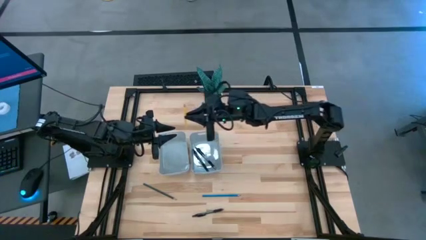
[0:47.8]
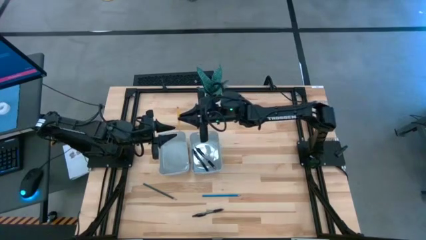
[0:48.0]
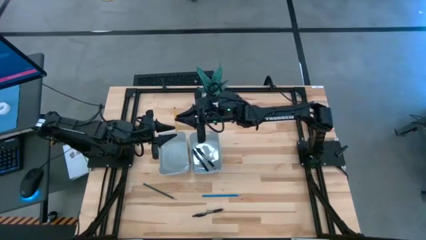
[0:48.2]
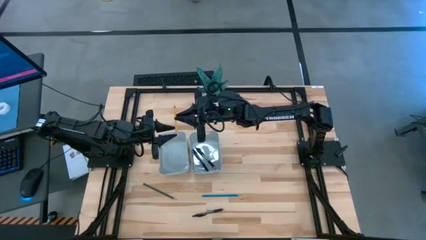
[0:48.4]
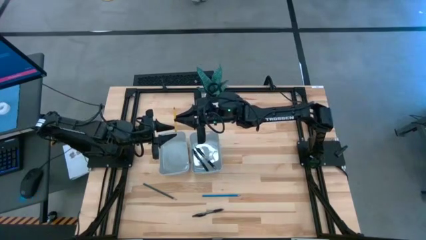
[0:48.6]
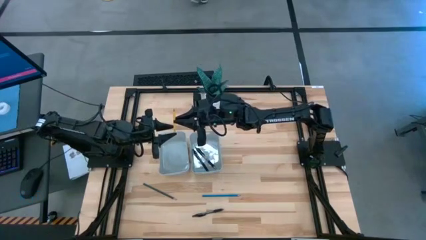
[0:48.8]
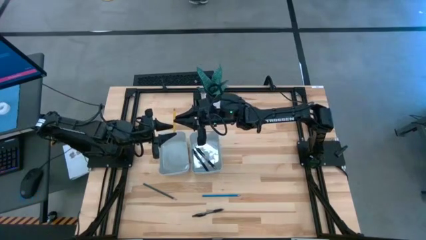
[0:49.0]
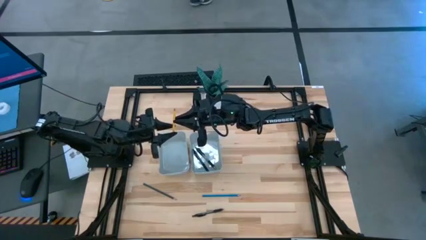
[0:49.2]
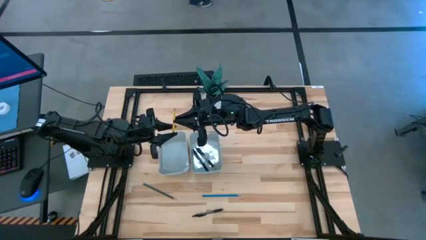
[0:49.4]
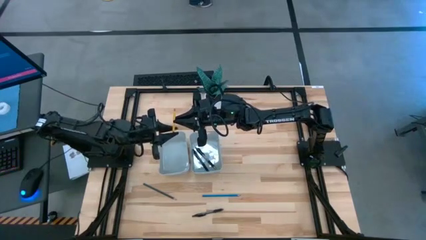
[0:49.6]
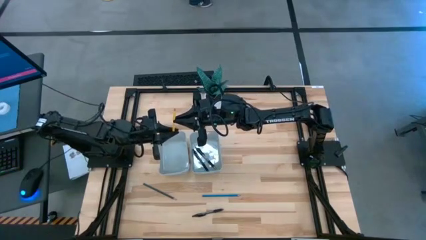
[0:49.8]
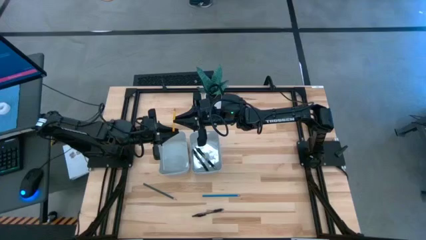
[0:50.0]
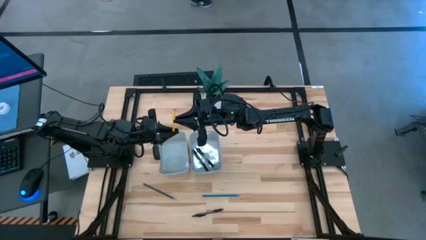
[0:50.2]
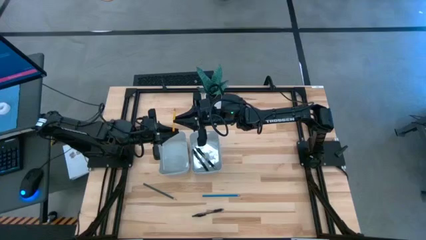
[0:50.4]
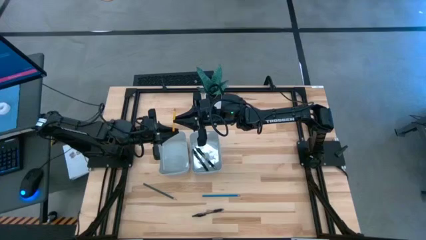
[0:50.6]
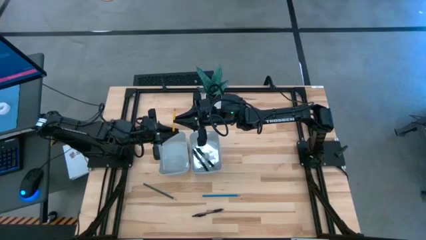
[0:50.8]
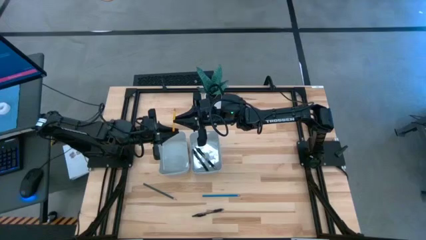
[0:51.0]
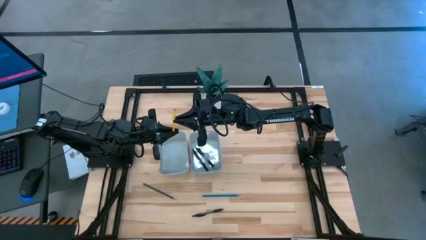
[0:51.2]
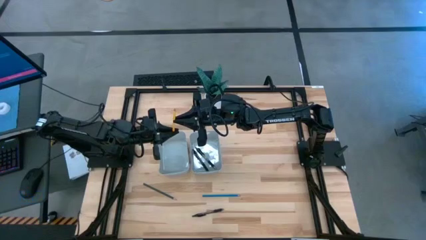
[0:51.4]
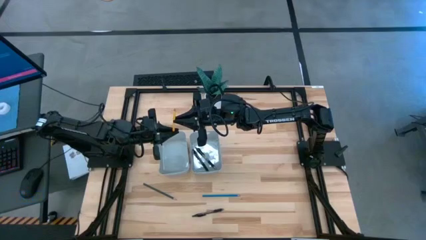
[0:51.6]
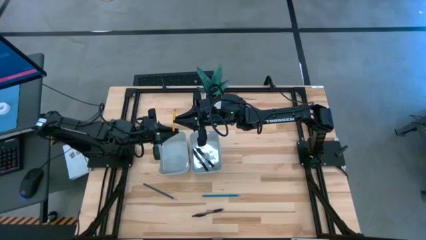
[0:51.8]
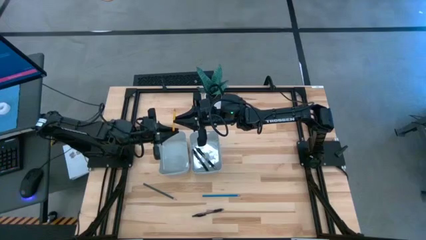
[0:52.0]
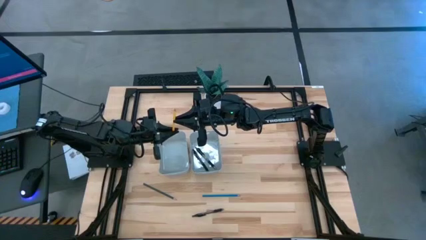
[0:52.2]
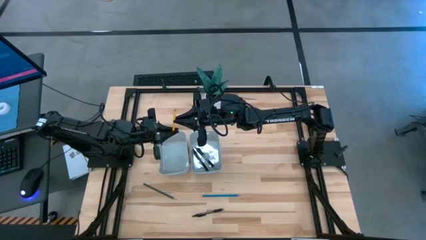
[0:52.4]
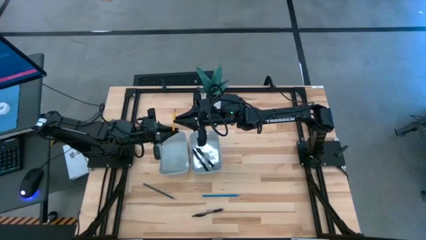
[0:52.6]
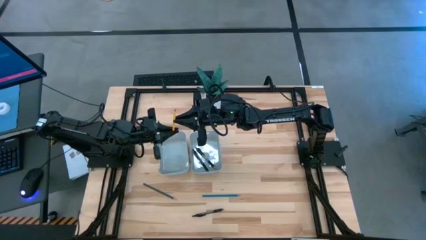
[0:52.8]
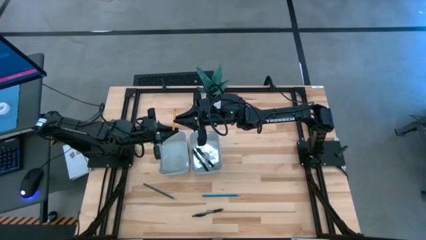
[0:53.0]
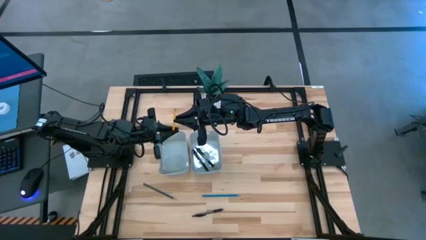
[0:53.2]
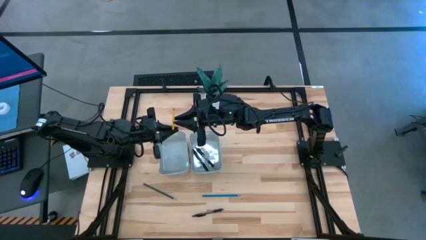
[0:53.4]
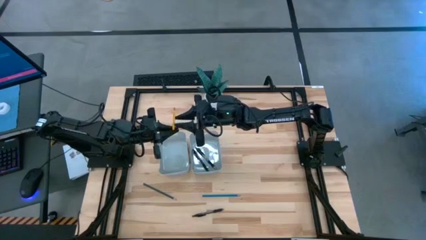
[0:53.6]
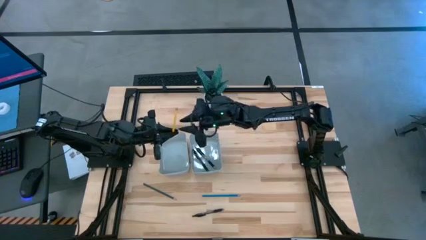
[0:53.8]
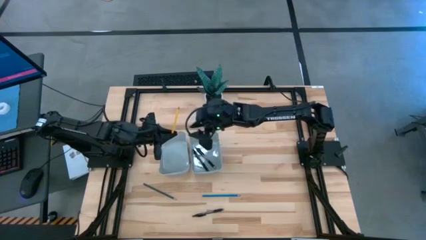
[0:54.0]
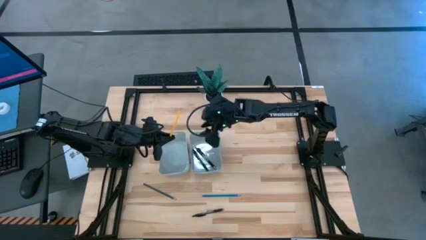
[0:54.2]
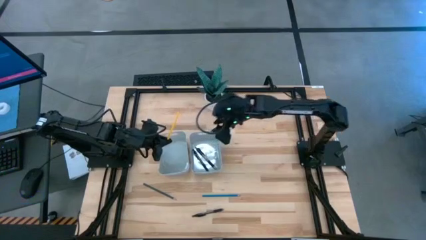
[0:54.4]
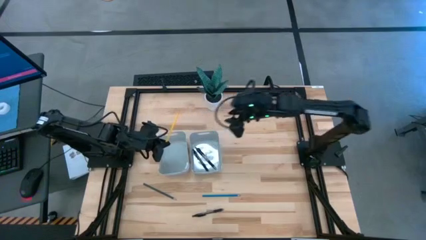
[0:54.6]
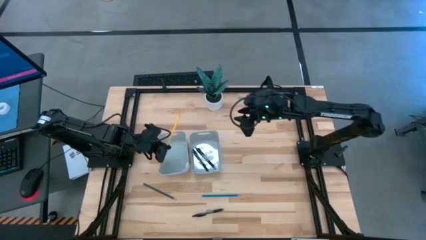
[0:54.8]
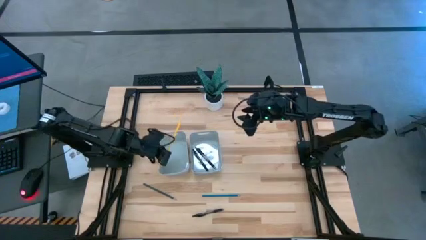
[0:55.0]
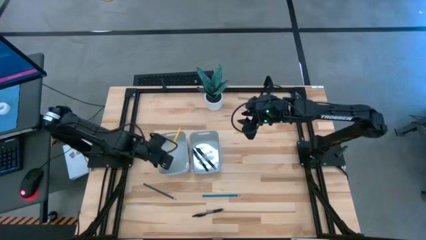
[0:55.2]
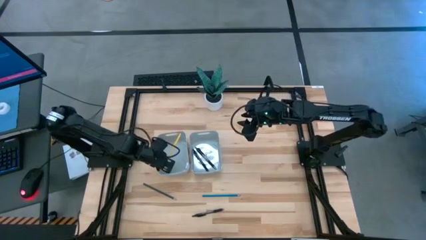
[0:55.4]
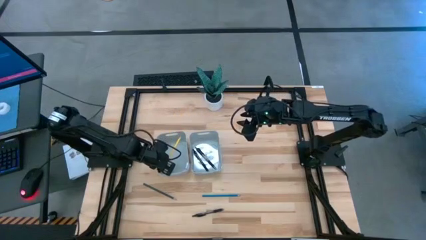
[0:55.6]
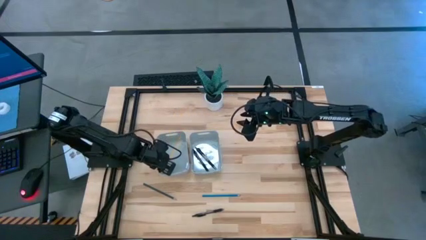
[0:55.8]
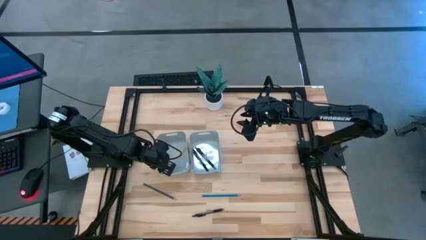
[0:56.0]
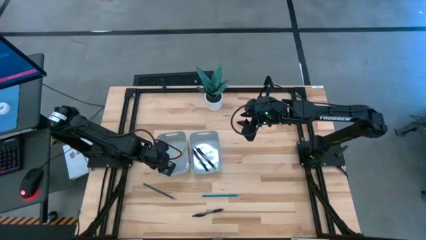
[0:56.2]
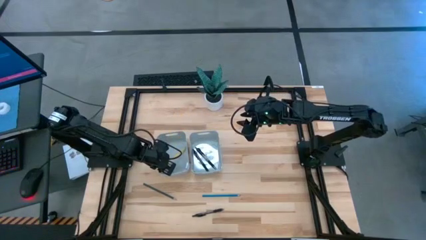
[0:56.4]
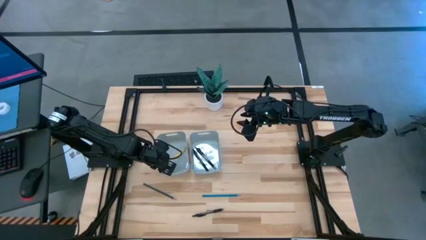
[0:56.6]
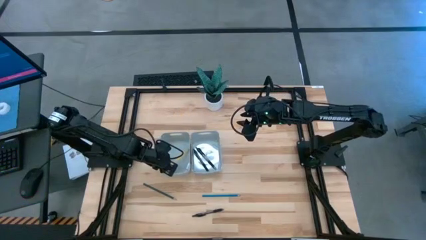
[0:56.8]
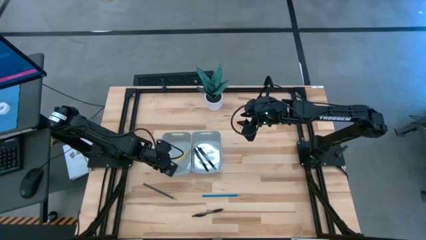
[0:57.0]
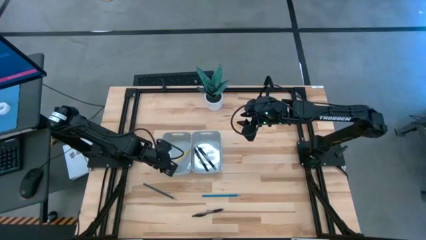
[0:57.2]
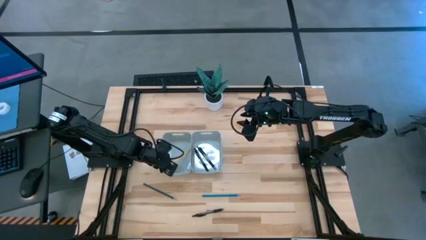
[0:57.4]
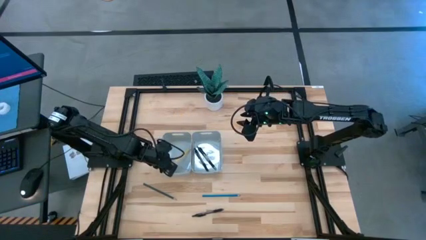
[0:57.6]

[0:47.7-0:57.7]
Task: Sort pens & pencils
Put the yellow pencil into the left gray bin

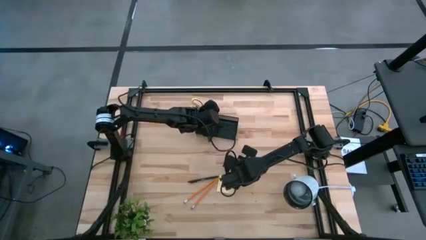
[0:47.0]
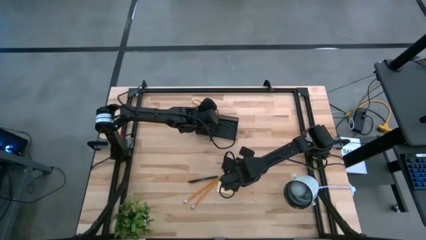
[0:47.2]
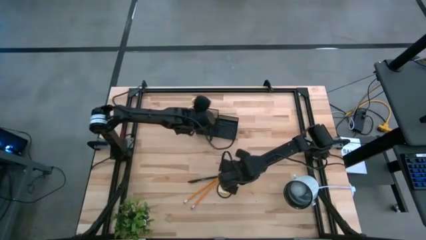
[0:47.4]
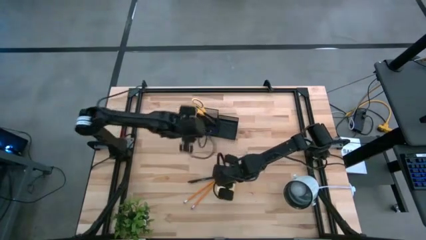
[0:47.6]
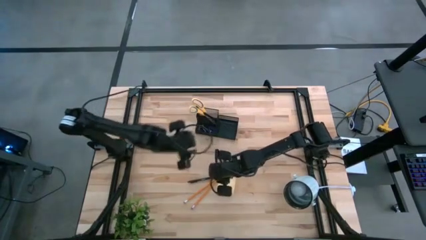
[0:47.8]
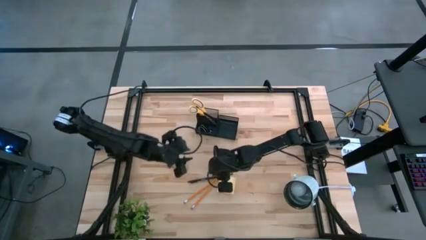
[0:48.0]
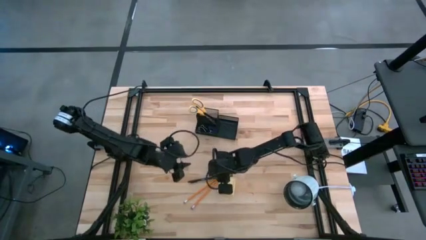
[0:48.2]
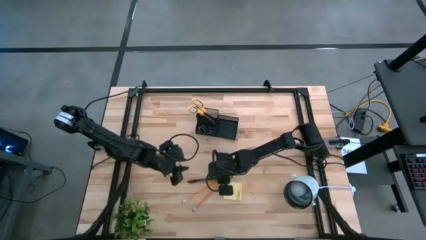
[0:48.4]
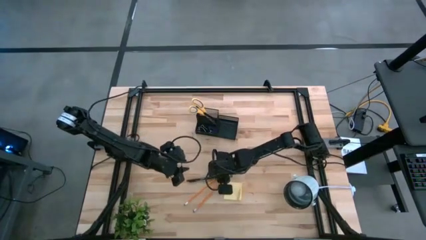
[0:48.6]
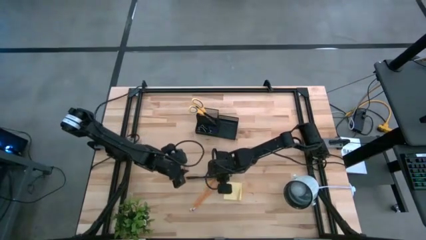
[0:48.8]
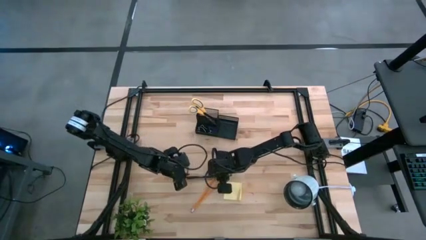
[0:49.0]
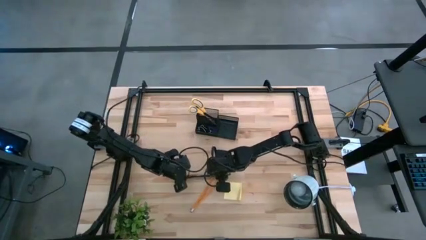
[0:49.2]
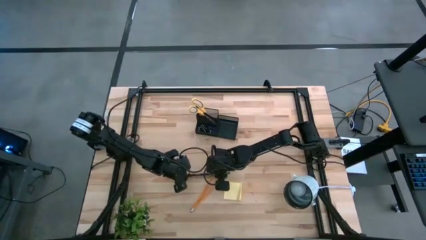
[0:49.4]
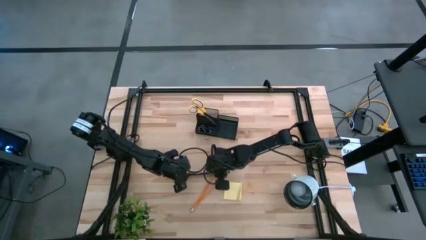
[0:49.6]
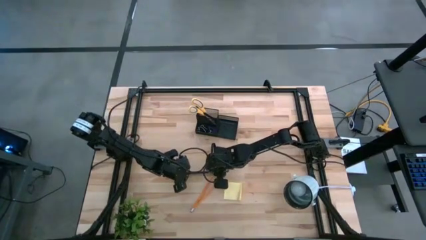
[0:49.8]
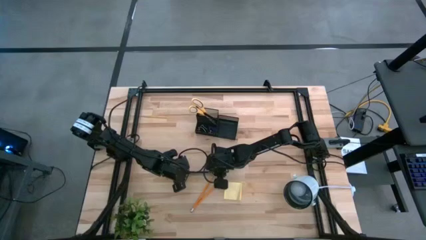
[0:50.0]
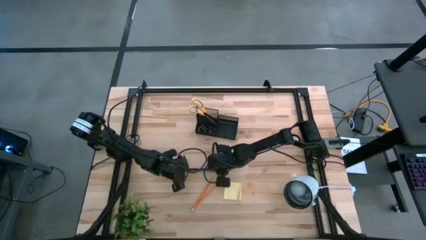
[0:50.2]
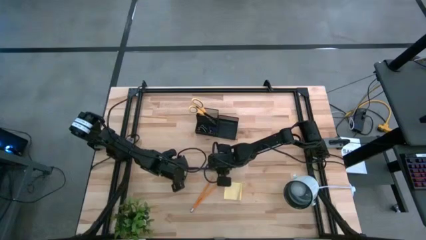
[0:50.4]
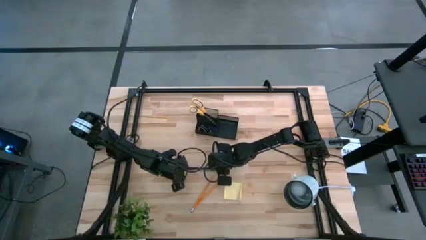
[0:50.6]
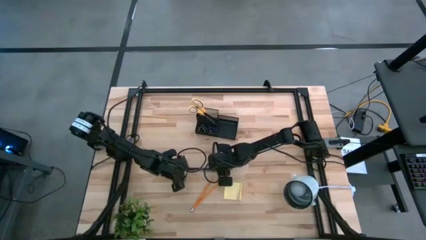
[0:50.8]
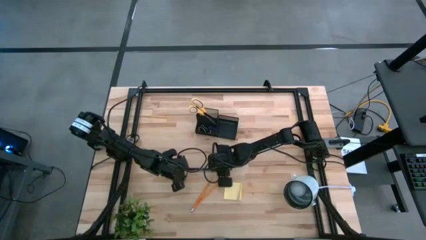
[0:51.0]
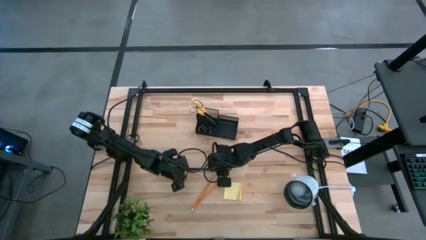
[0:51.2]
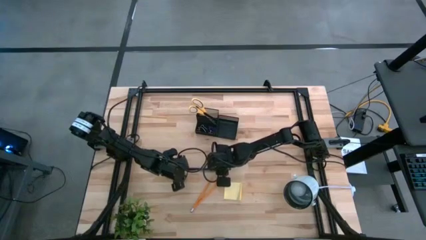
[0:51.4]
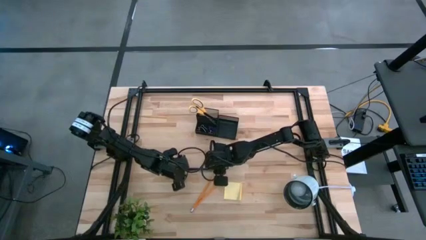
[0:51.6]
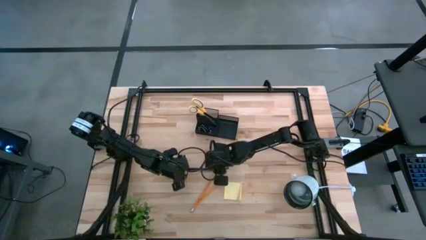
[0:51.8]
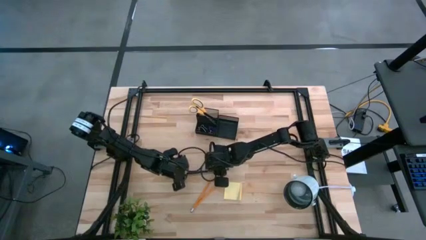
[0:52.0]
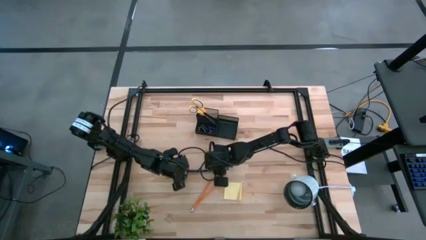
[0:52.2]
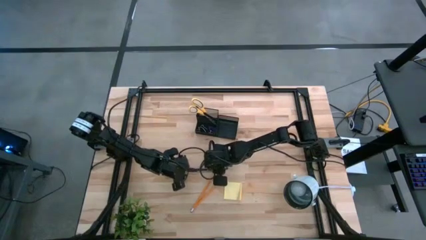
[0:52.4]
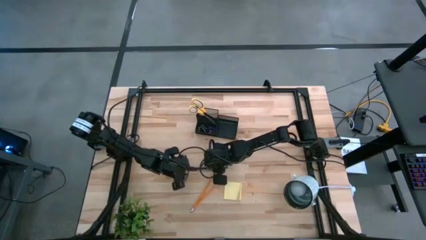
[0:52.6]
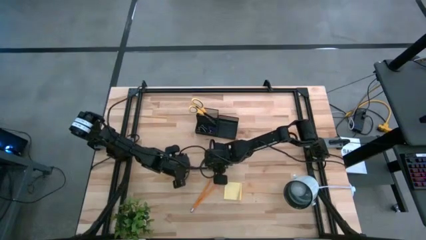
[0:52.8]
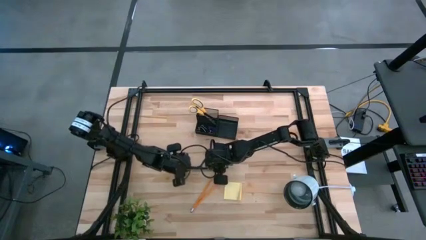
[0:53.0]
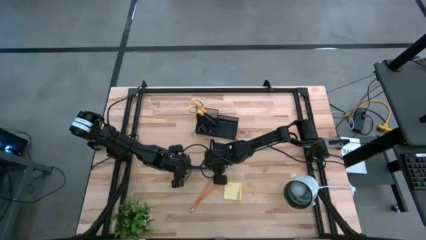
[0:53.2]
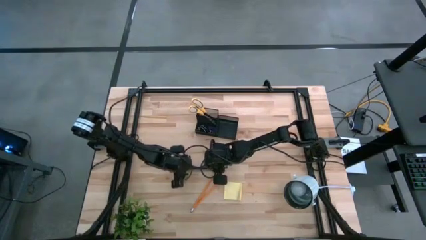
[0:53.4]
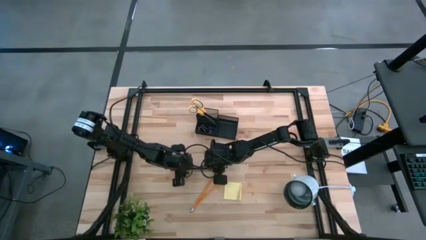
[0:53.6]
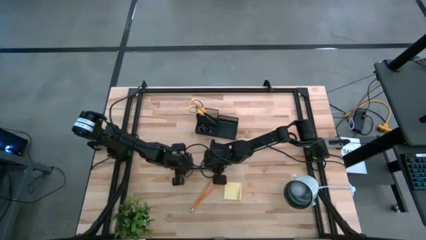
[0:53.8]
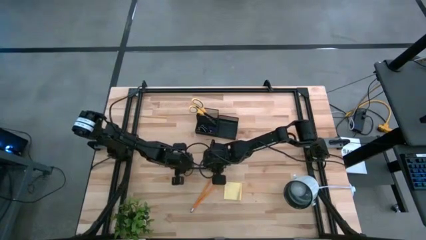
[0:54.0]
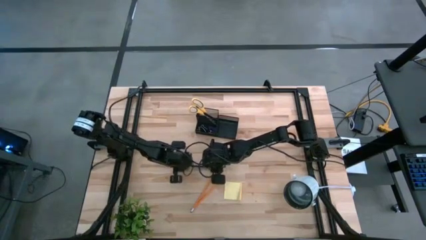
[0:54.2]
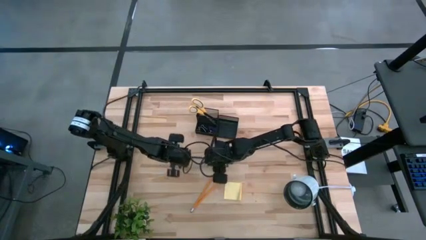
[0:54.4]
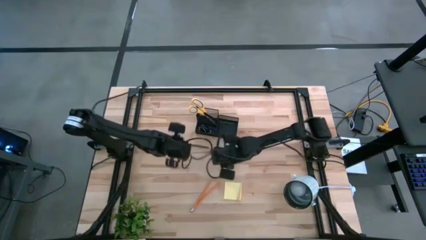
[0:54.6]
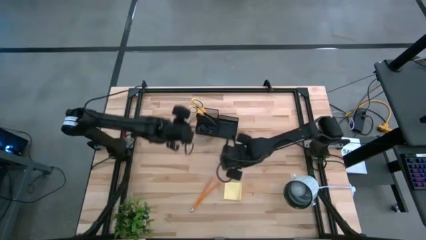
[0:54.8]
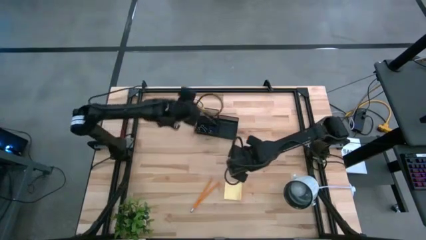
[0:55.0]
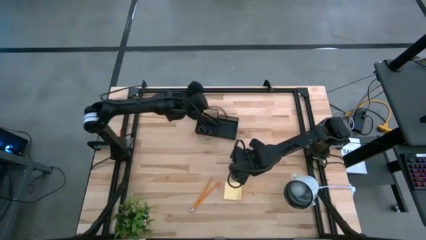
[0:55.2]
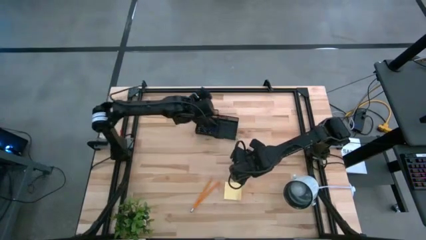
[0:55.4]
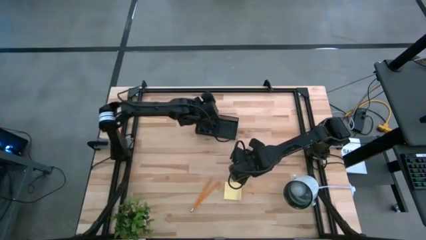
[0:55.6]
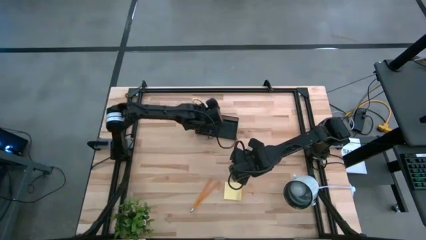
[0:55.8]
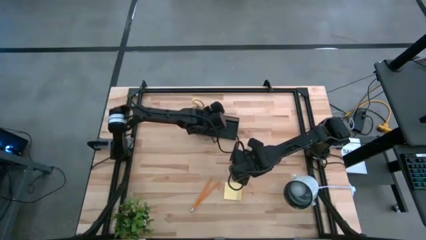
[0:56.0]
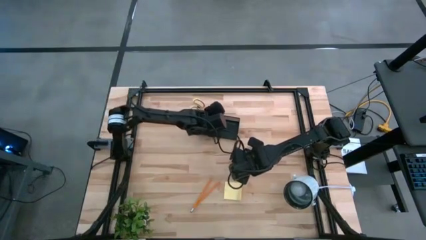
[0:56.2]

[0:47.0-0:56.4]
Task: Pick and place office supplies into organizer
Put the black pen into the black organizer bin
